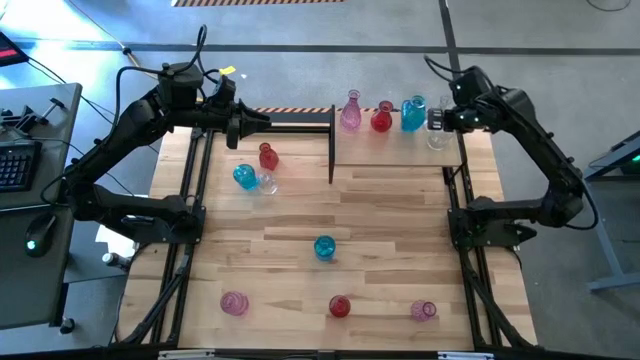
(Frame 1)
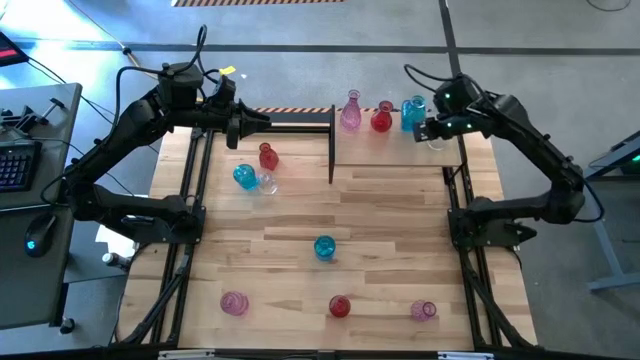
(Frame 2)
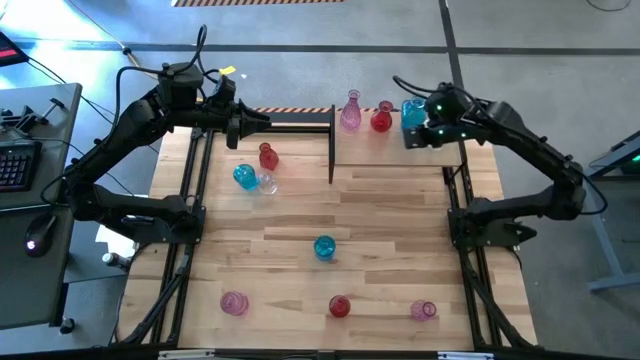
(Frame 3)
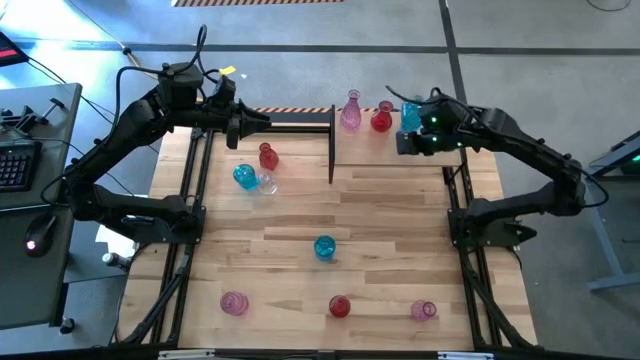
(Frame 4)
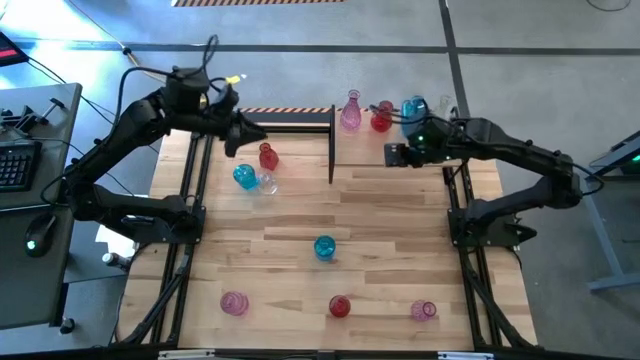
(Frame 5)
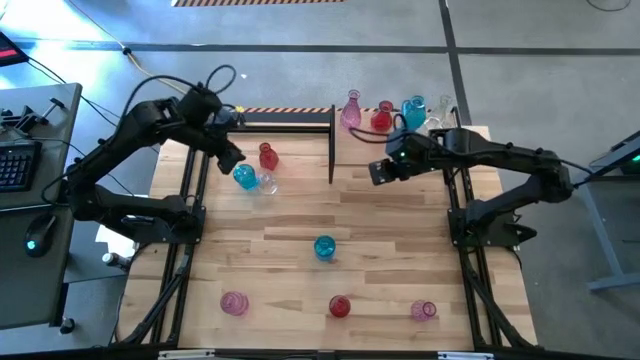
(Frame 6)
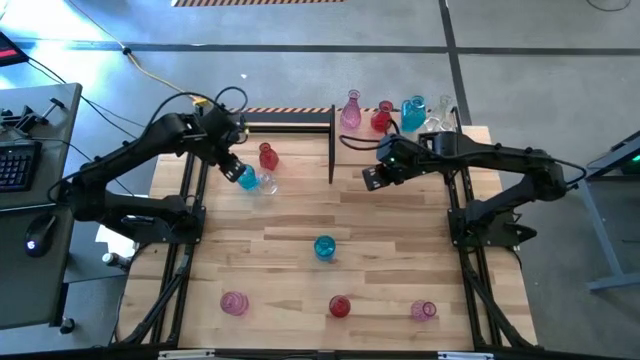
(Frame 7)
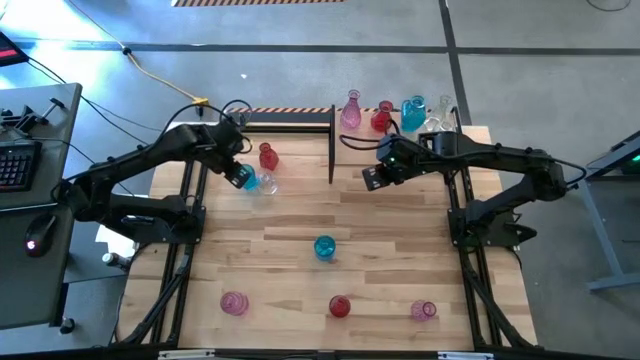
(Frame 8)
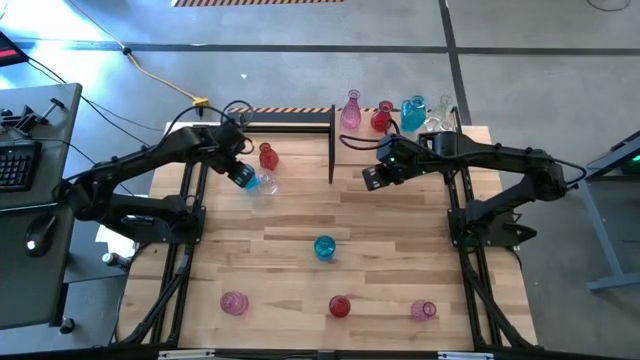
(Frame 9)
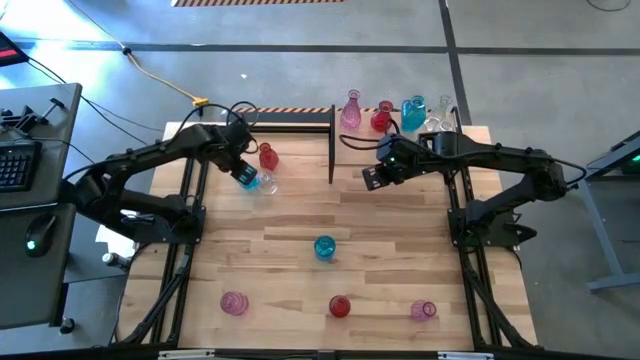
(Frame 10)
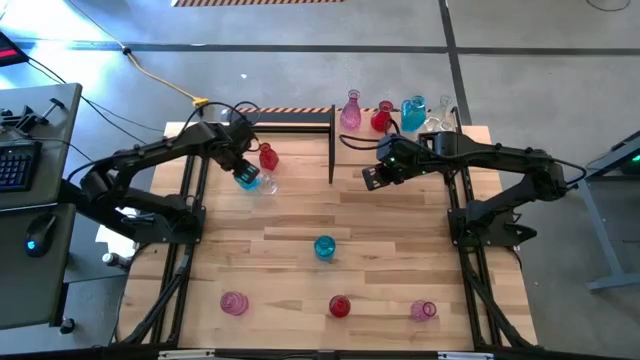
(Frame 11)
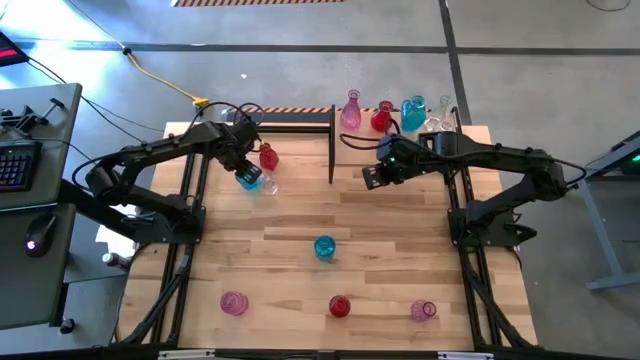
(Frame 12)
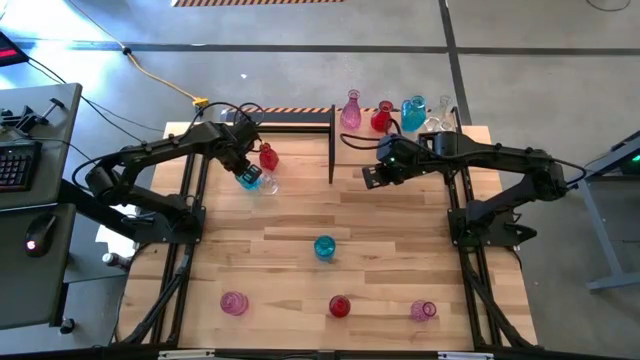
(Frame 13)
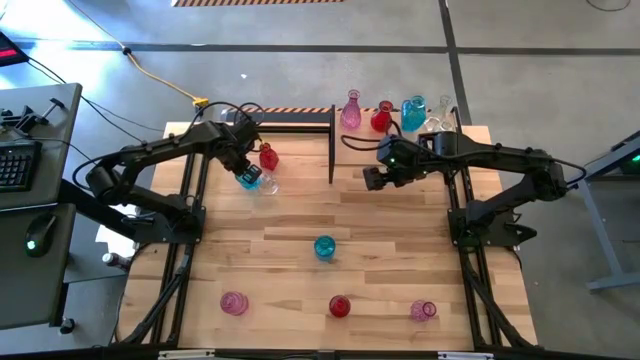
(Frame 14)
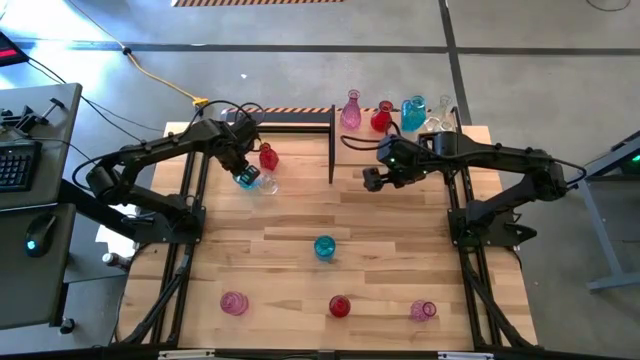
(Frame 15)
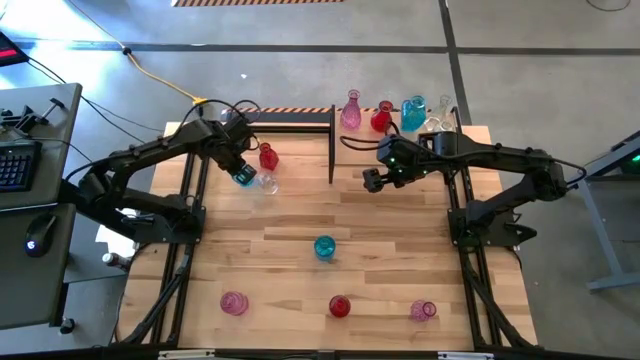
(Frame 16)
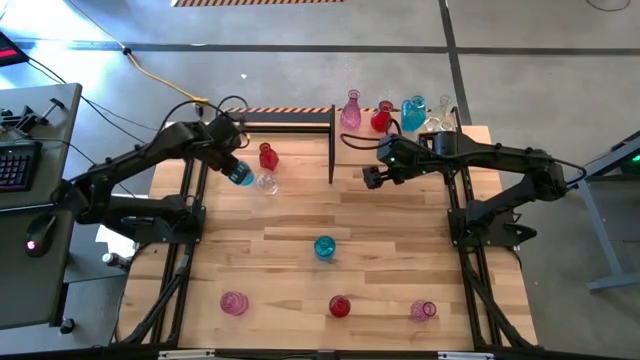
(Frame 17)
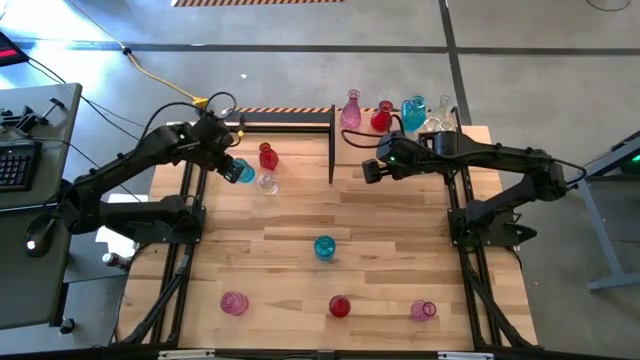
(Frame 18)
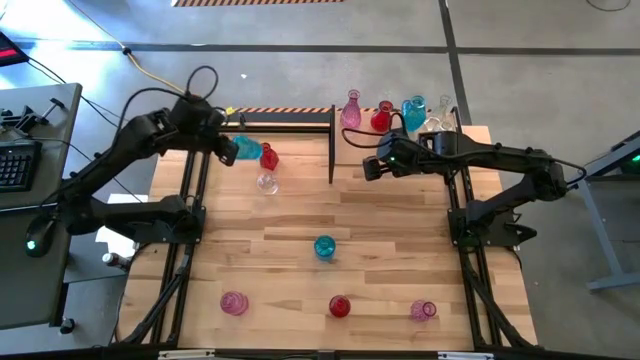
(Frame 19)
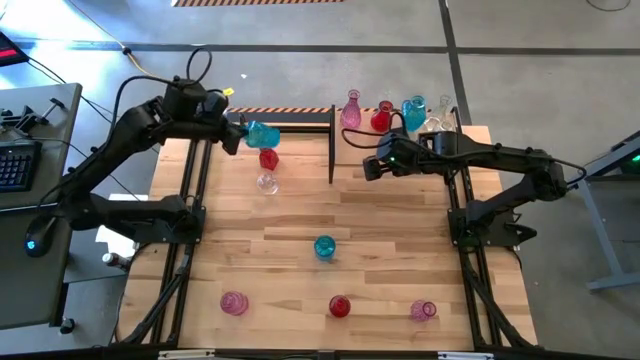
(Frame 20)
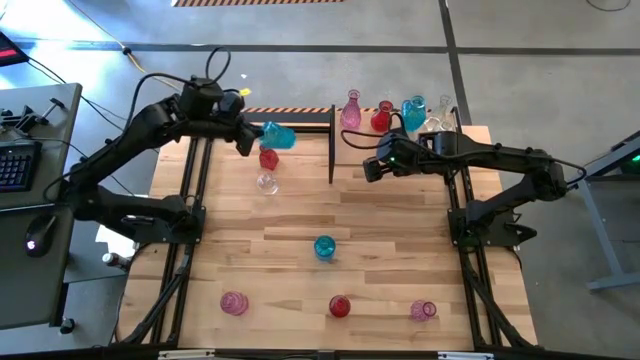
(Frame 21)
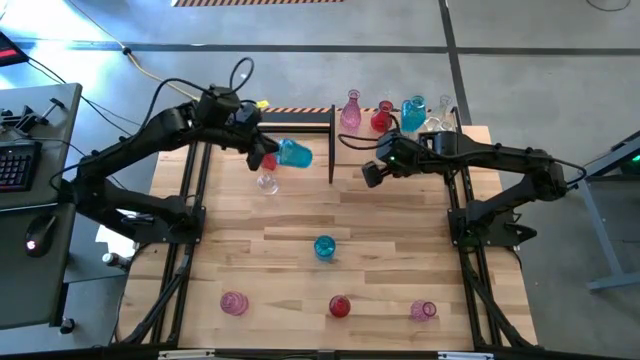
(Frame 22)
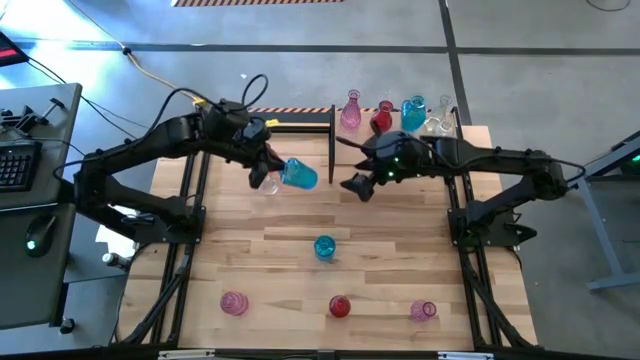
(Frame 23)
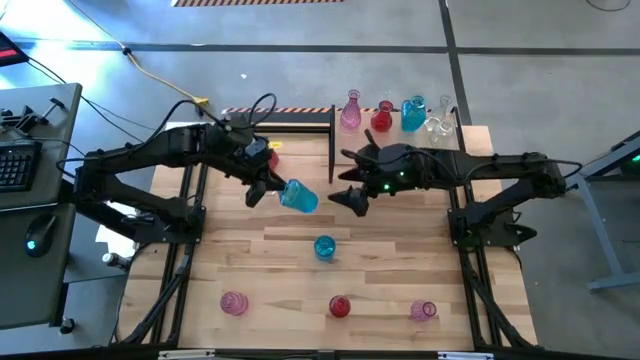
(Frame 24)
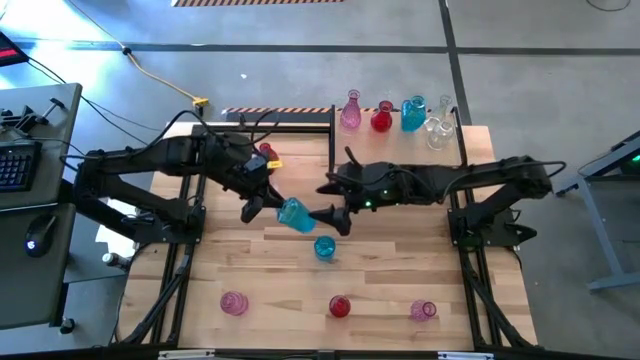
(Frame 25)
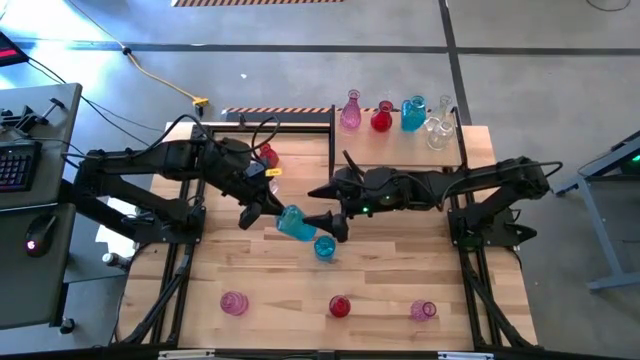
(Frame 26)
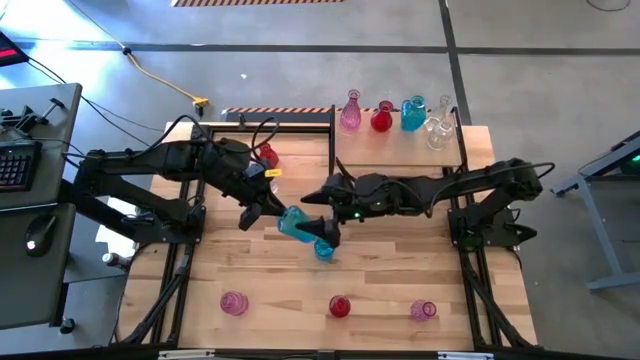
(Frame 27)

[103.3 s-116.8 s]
Task: sort vases onto shelf
Put the top blue vase on the shelf aligned with the blue vase

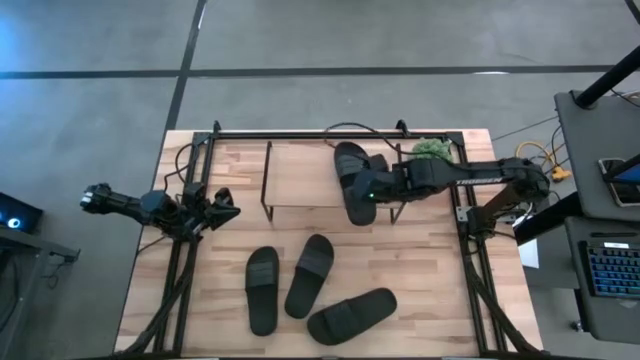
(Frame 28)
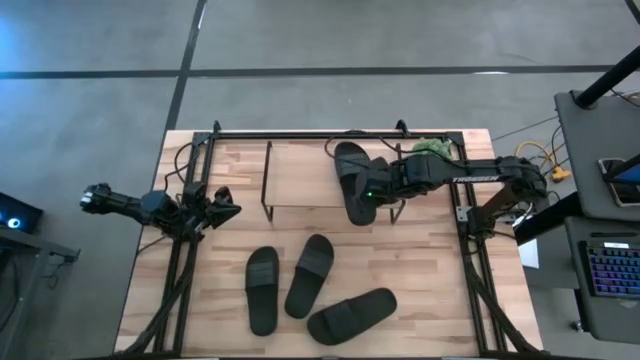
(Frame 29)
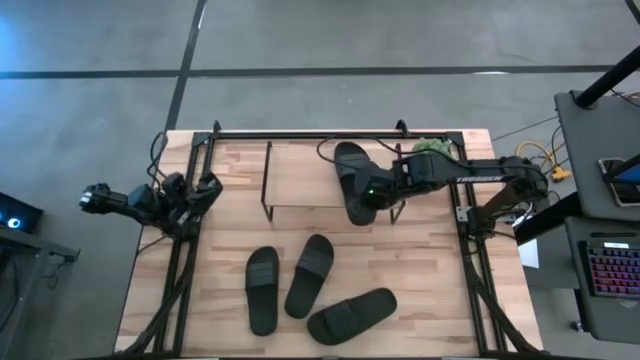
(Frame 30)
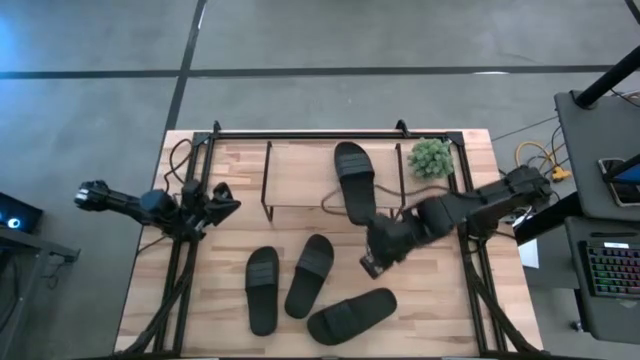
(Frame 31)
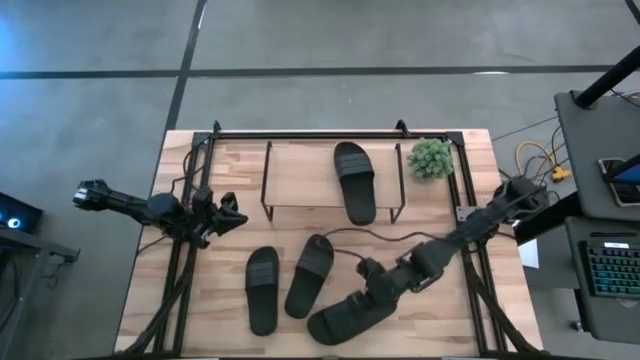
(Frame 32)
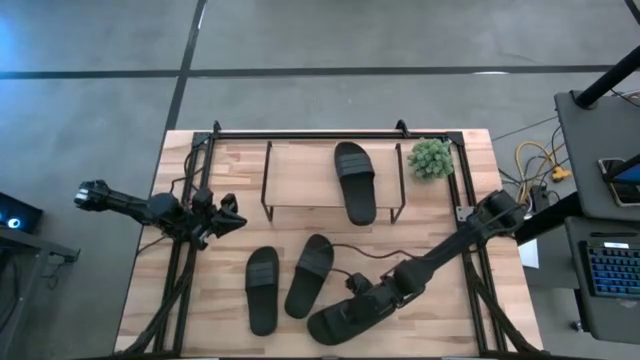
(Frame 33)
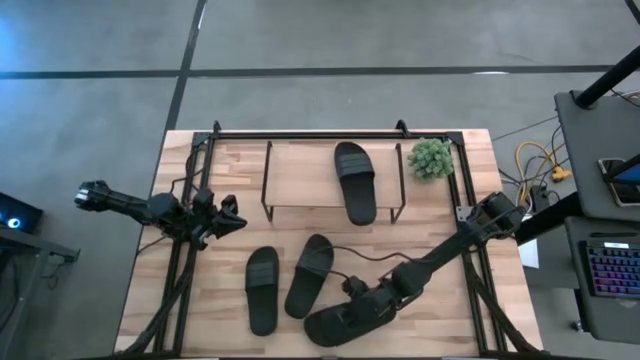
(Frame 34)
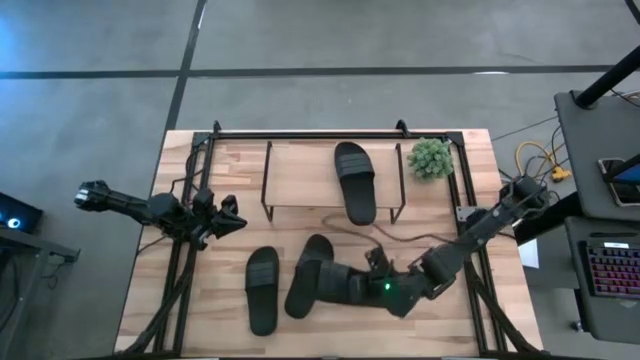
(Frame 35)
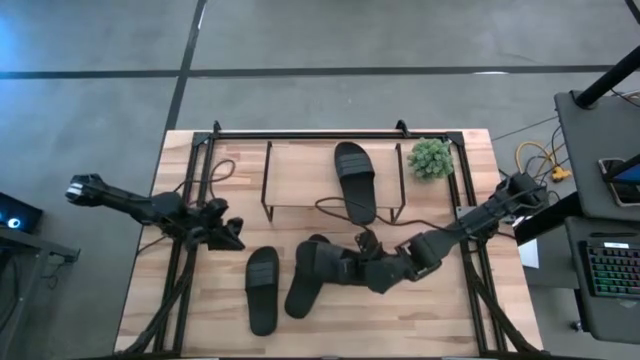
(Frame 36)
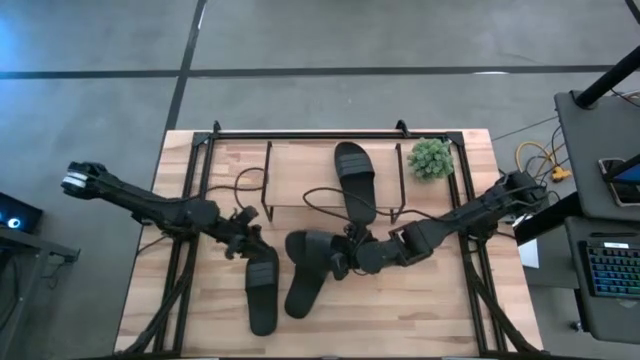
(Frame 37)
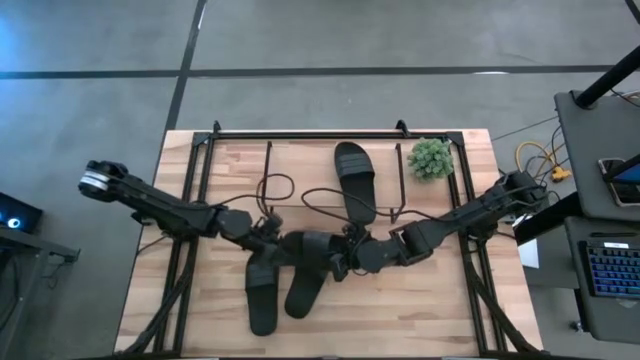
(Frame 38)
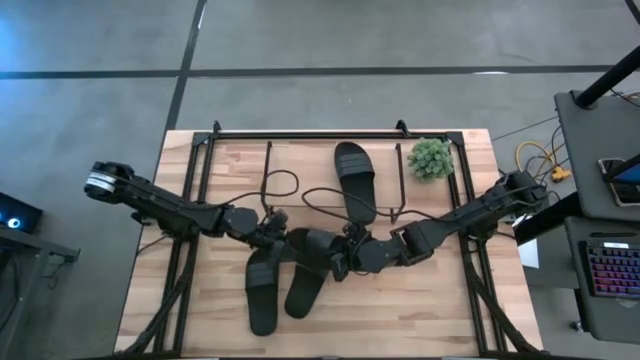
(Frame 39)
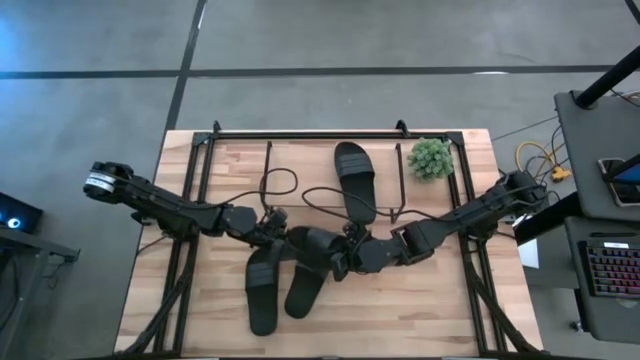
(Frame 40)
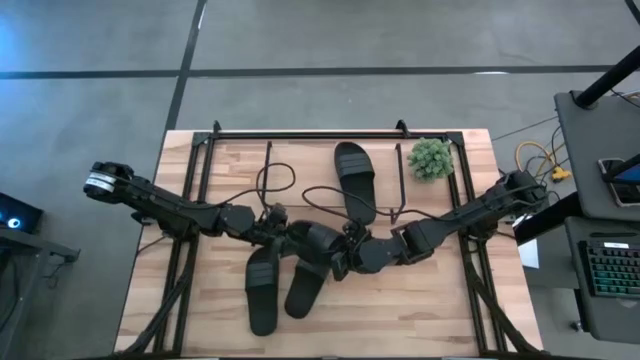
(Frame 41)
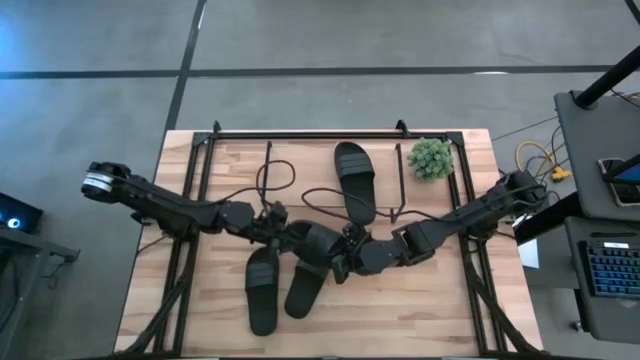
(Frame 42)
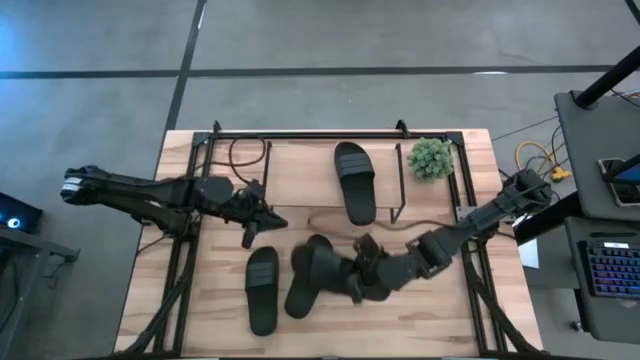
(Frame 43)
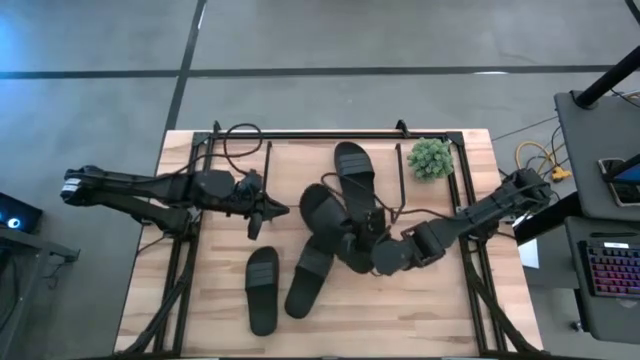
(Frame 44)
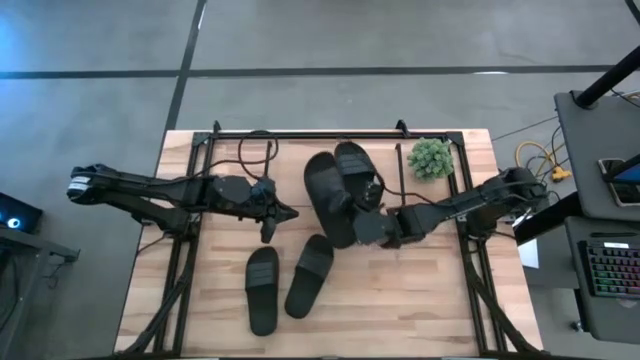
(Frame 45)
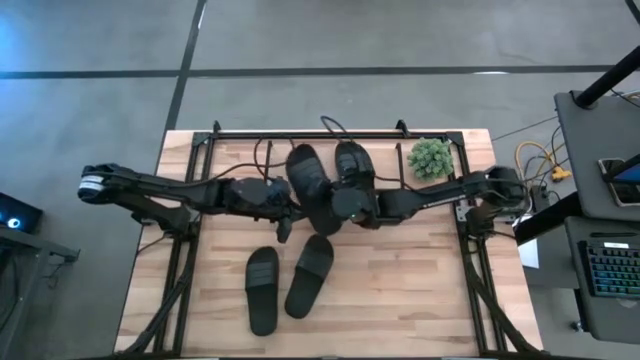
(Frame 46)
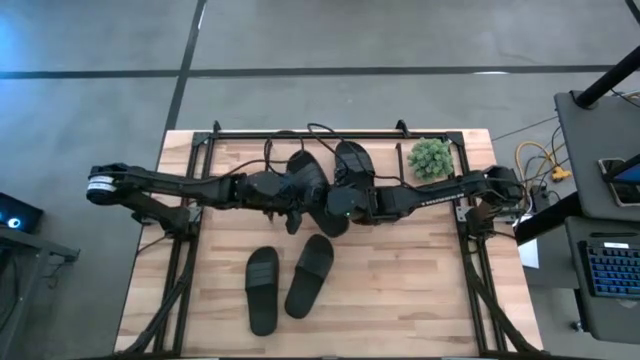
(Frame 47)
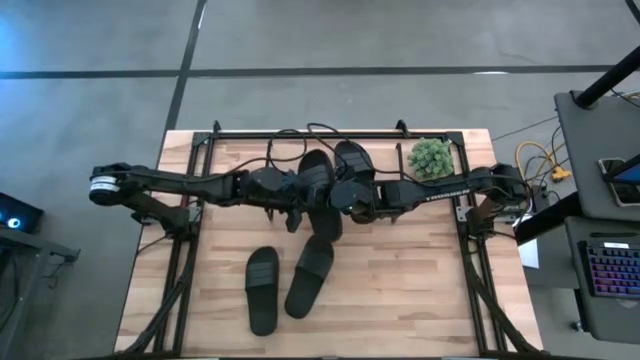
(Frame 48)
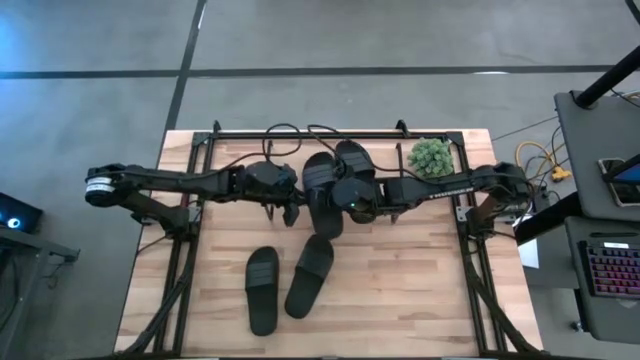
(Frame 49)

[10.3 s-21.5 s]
Task: Pick and place slides into the shelf
Put the black slide on the shelf
